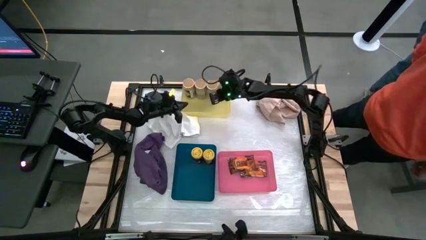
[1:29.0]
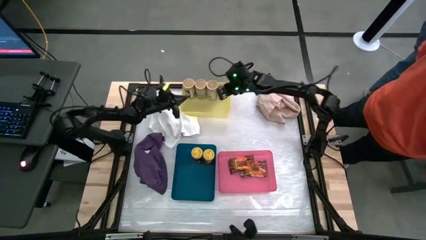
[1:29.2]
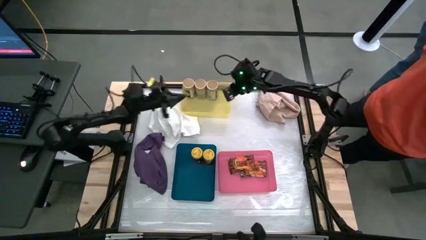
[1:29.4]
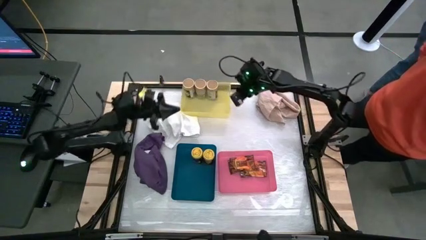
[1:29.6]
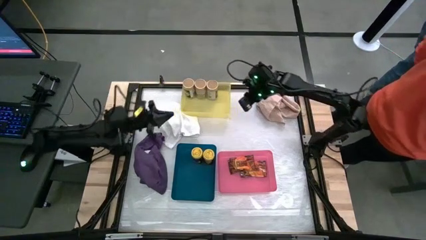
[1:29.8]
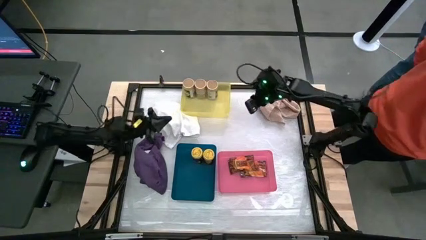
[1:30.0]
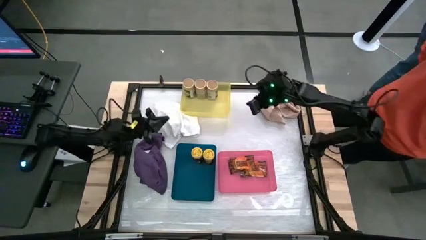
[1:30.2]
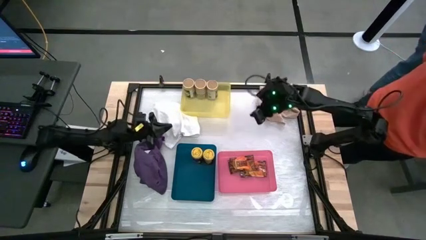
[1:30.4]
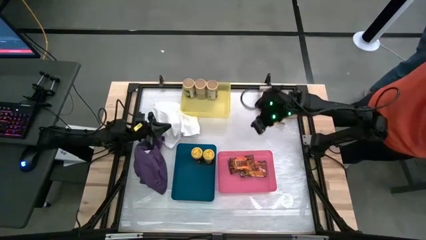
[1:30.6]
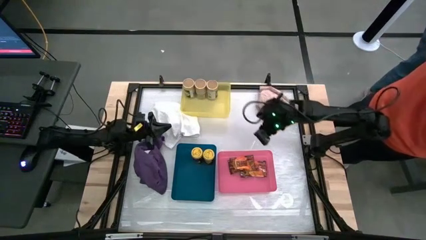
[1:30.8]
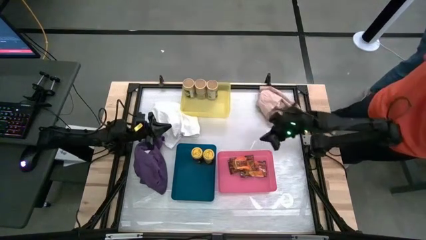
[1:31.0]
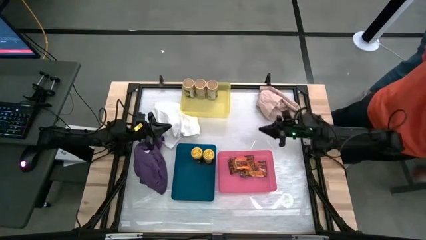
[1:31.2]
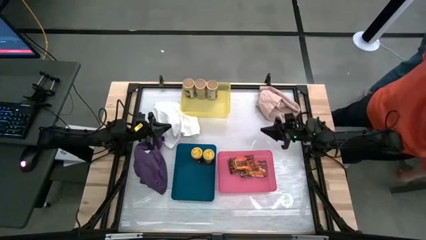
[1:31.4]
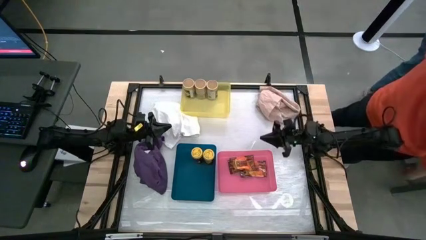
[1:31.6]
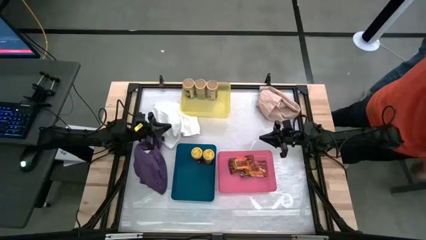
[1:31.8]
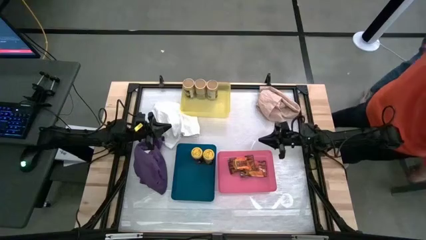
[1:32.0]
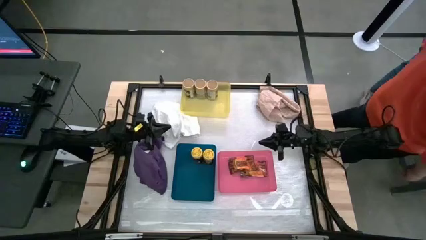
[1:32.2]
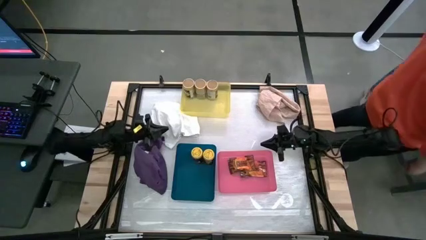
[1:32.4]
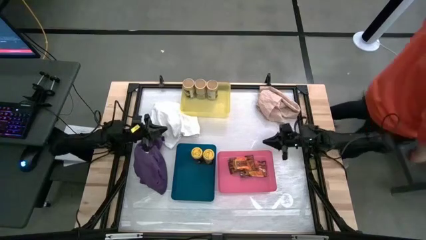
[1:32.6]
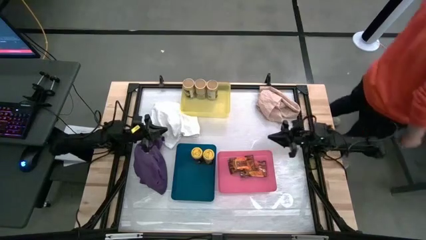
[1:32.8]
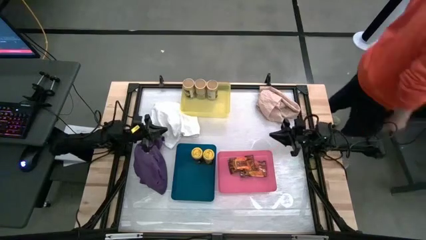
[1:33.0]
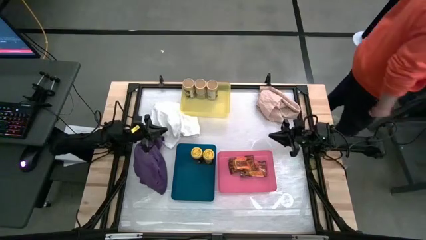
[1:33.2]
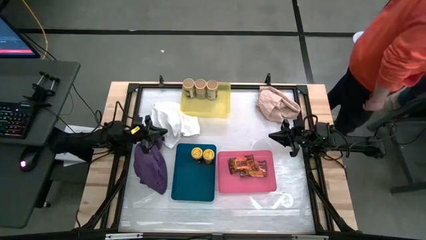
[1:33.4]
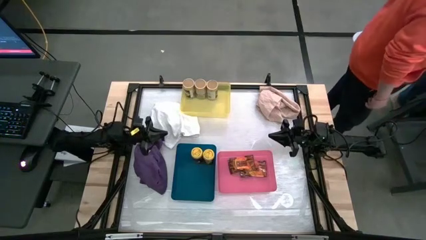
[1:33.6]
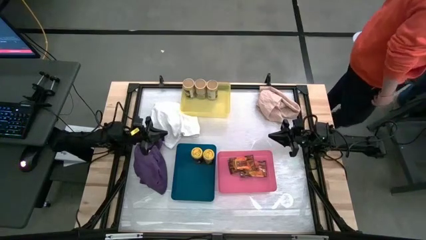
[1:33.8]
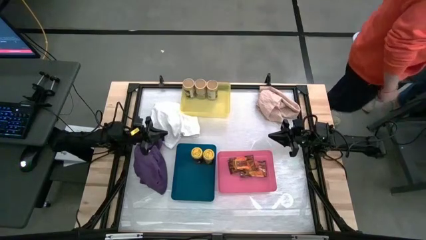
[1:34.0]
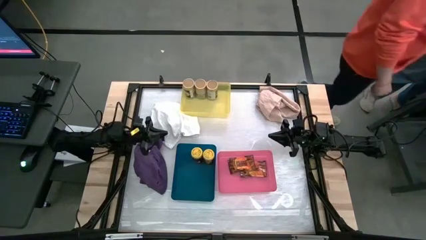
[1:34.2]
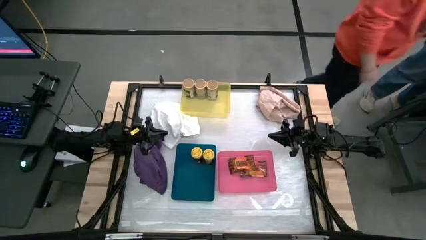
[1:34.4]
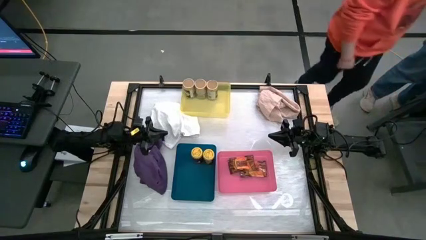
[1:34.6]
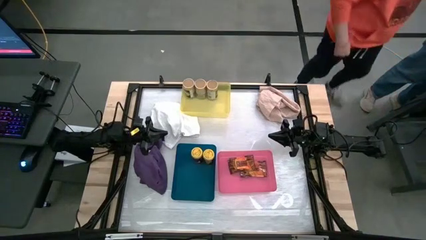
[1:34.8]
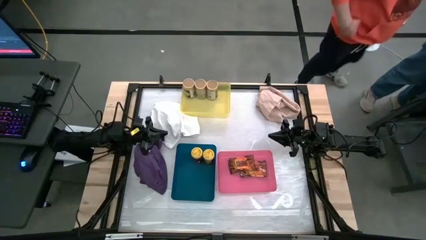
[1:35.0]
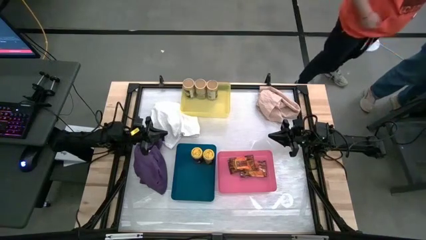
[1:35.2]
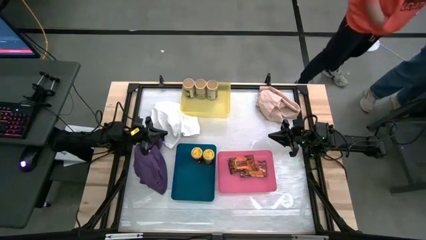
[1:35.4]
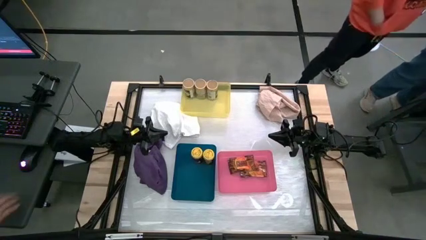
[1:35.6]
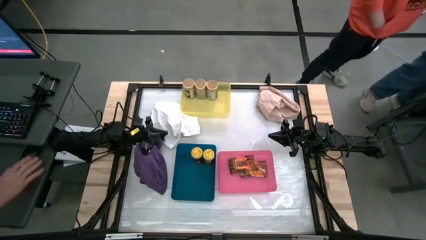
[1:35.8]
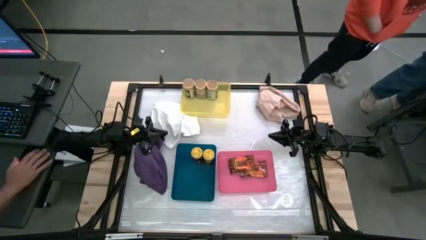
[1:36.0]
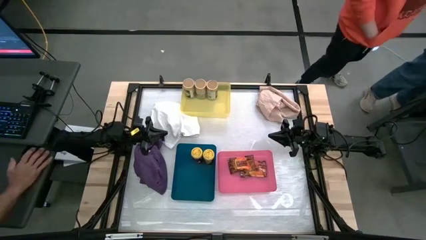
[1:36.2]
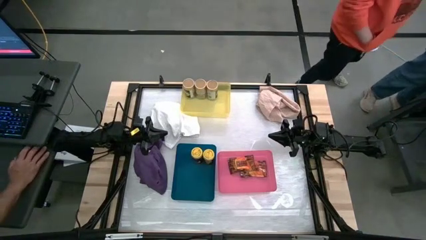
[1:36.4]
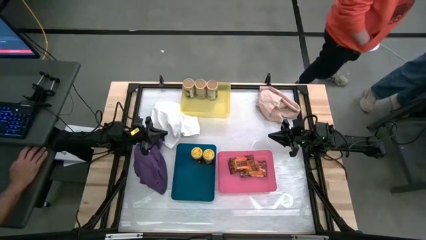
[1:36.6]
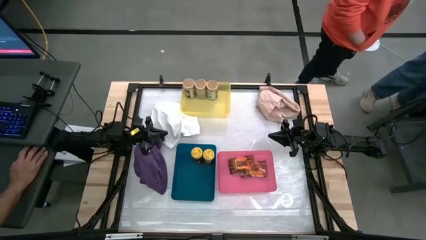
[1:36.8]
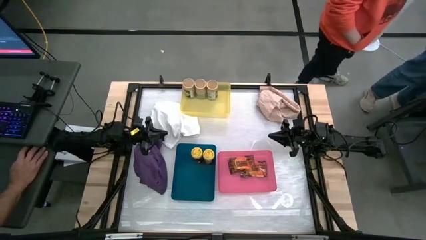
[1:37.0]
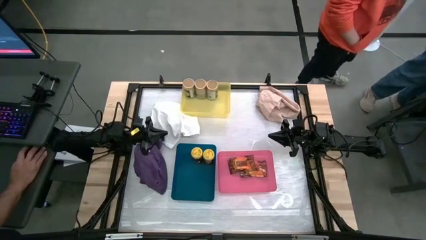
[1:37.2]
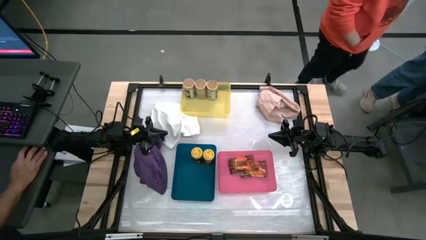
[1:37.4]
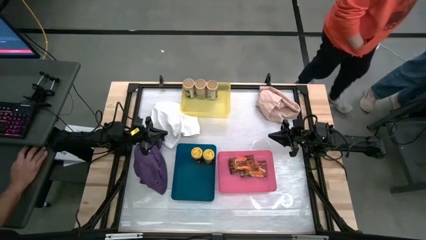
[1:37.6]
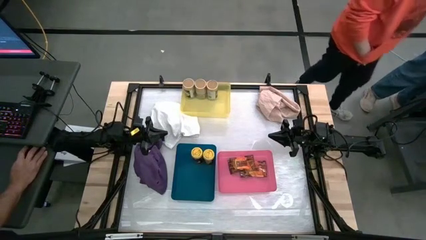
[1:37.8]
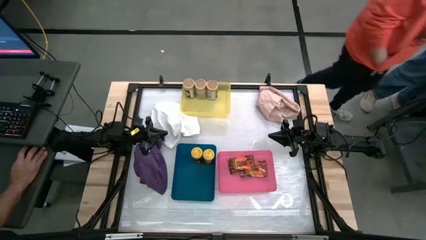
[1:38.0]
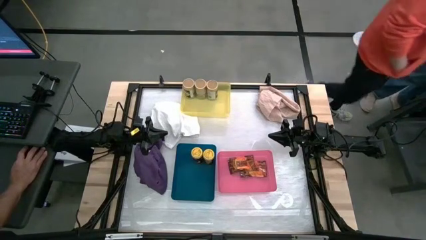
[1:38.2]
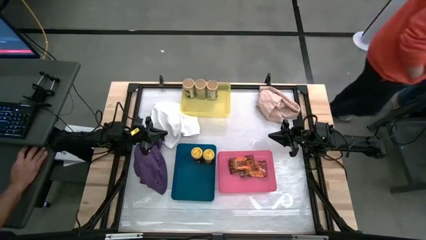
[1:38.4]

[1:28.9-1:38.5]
Task: Sort spices by type
Return to Home Position
